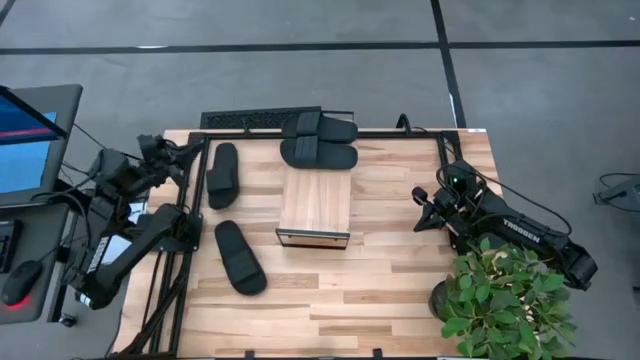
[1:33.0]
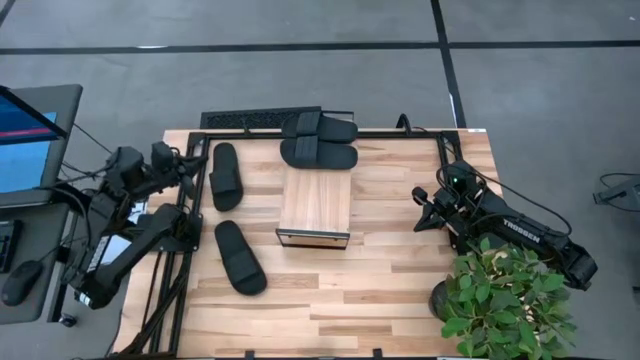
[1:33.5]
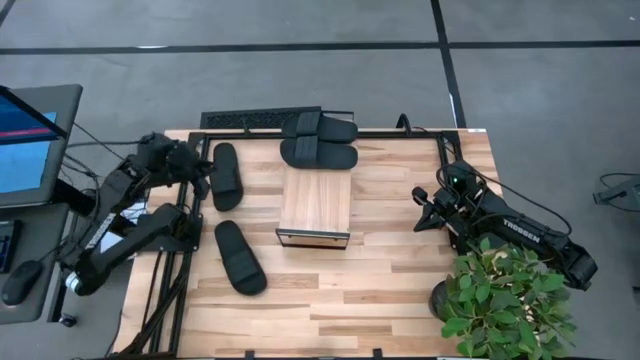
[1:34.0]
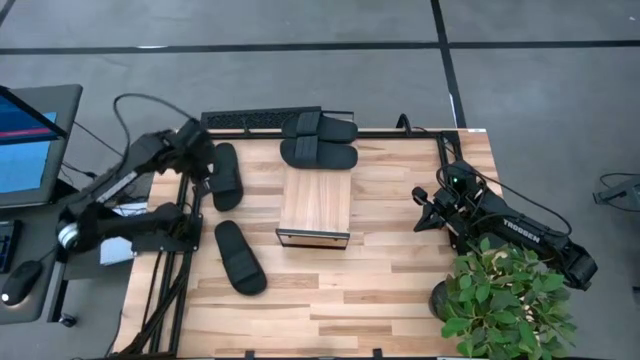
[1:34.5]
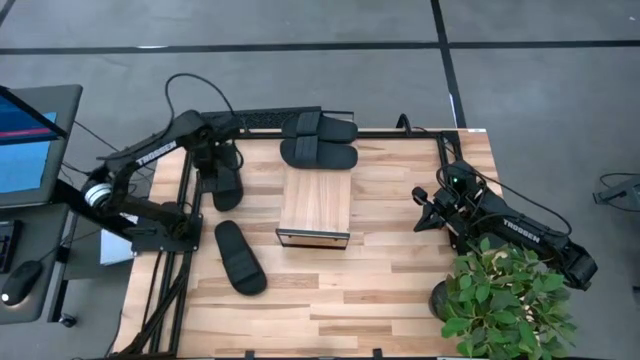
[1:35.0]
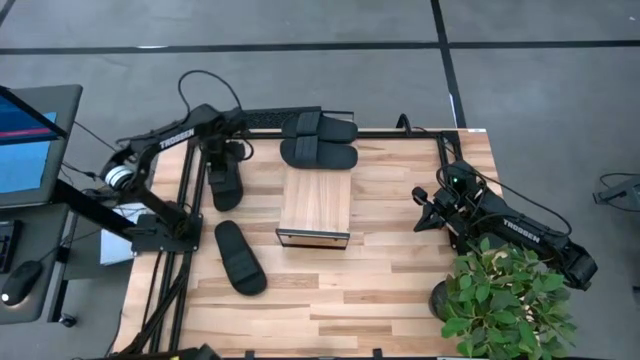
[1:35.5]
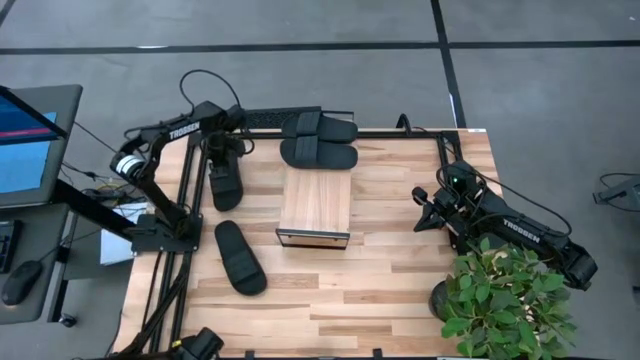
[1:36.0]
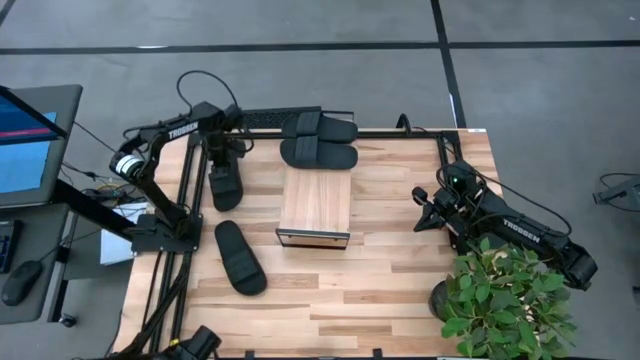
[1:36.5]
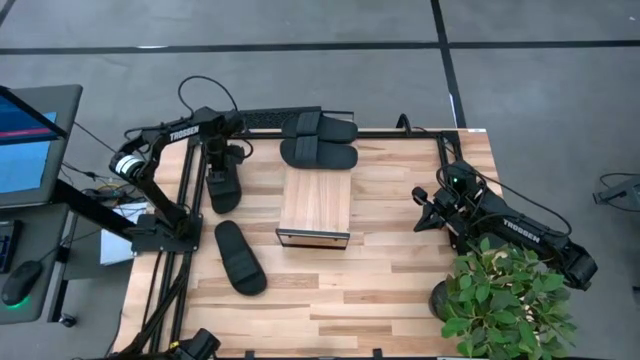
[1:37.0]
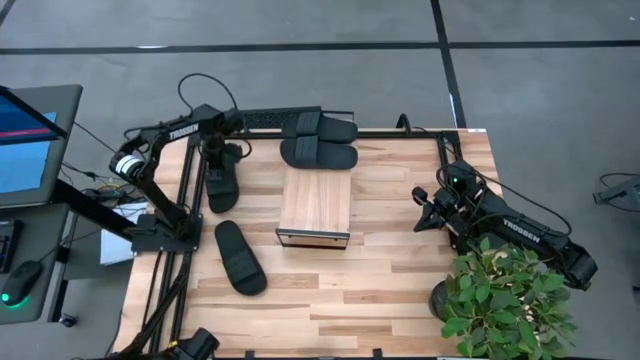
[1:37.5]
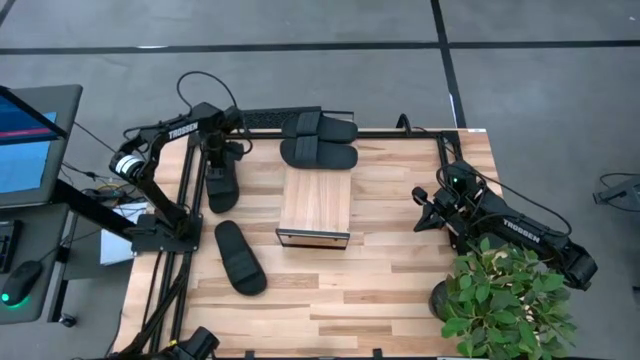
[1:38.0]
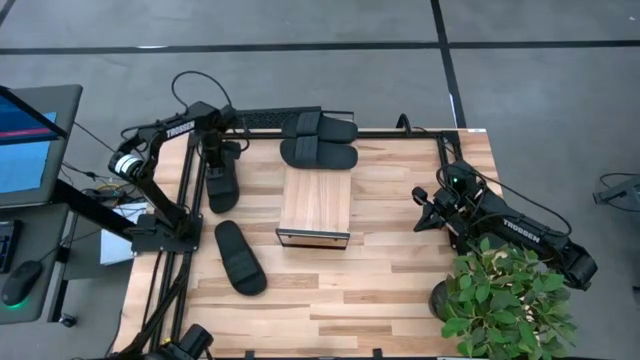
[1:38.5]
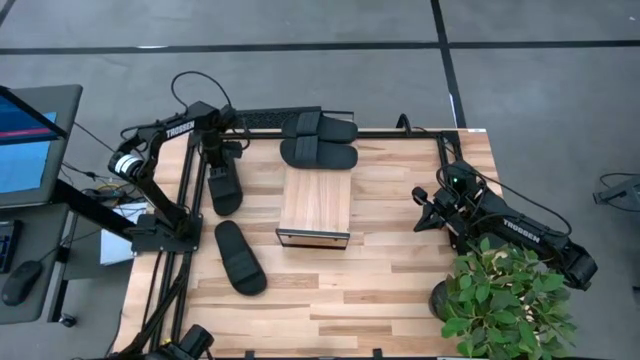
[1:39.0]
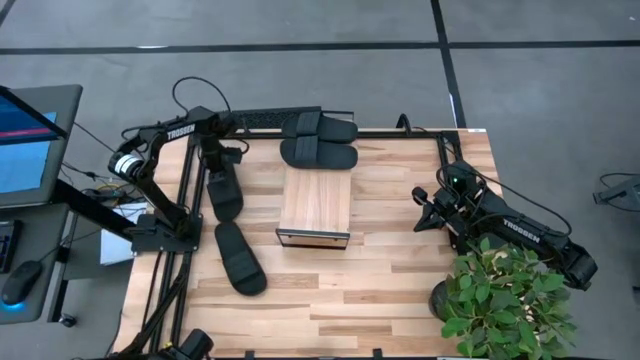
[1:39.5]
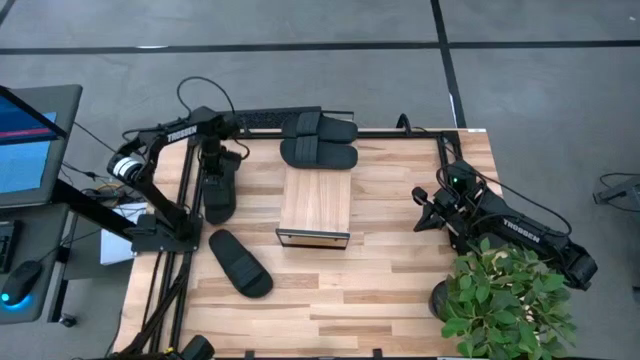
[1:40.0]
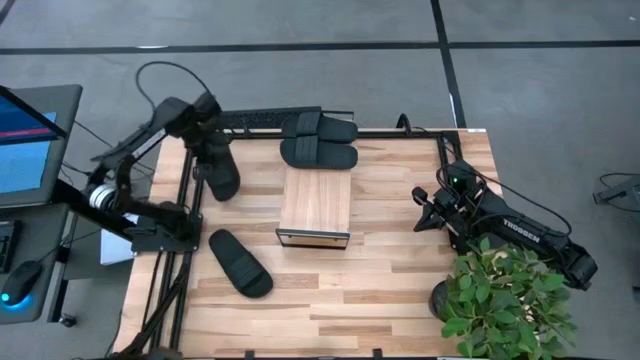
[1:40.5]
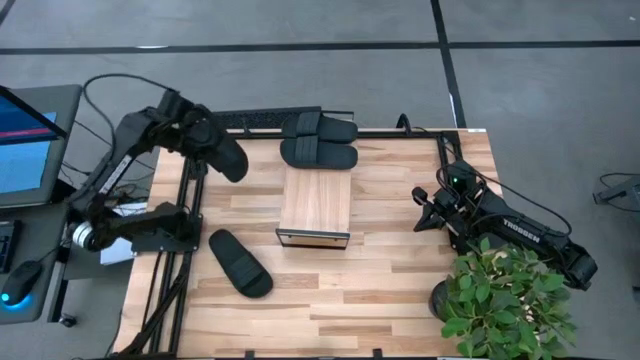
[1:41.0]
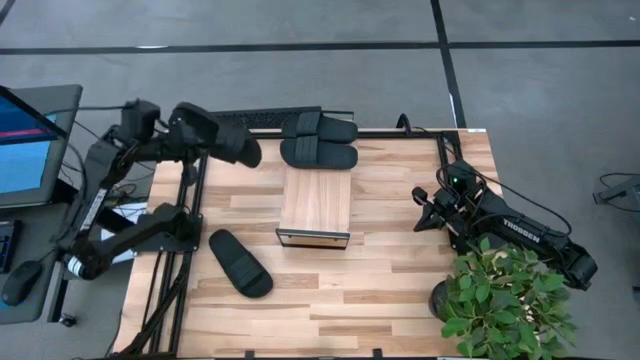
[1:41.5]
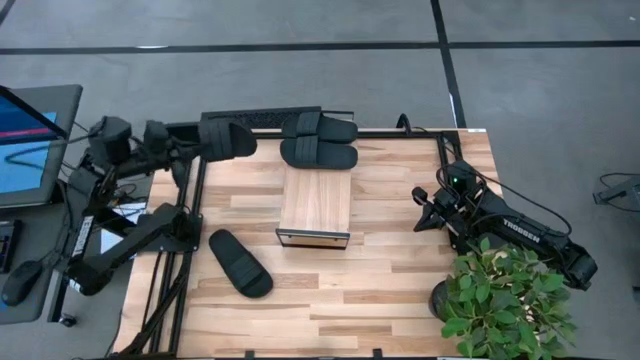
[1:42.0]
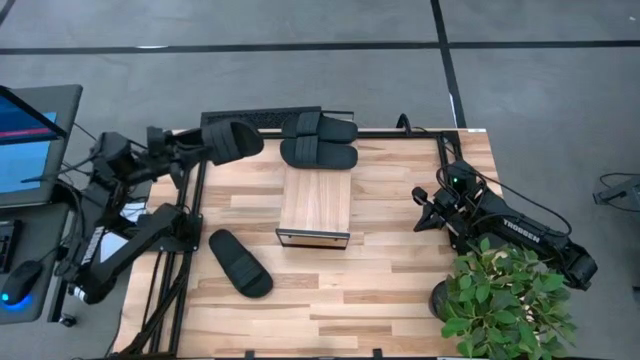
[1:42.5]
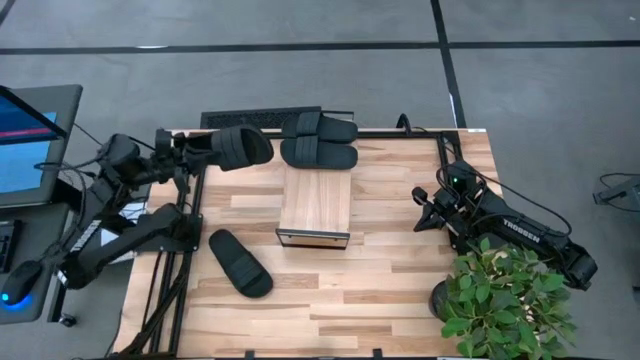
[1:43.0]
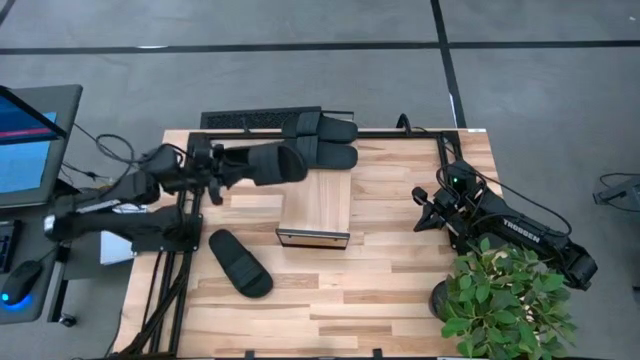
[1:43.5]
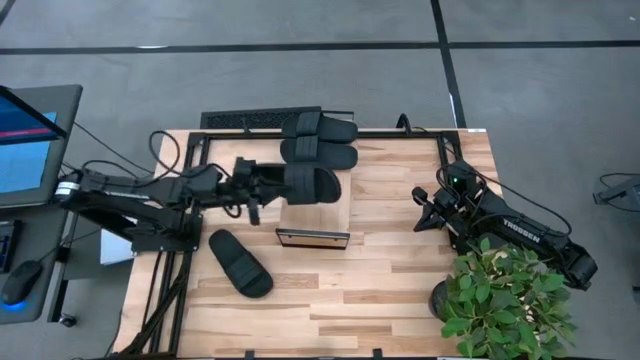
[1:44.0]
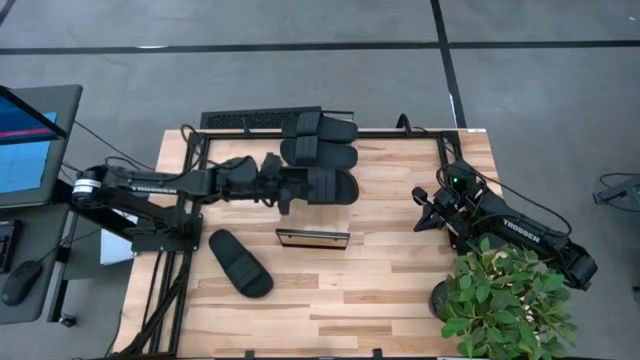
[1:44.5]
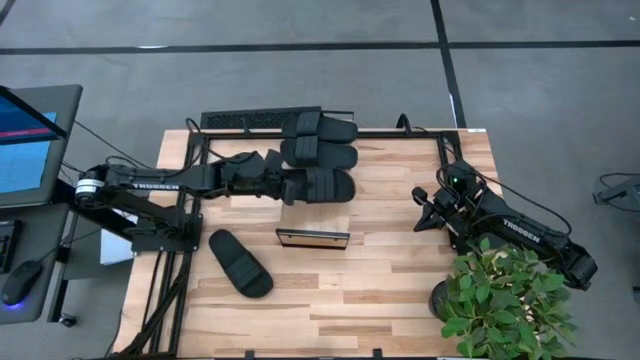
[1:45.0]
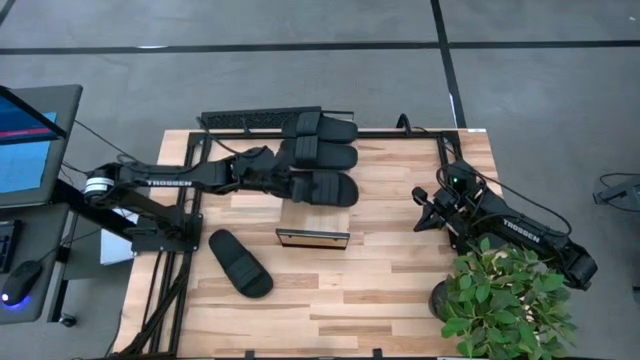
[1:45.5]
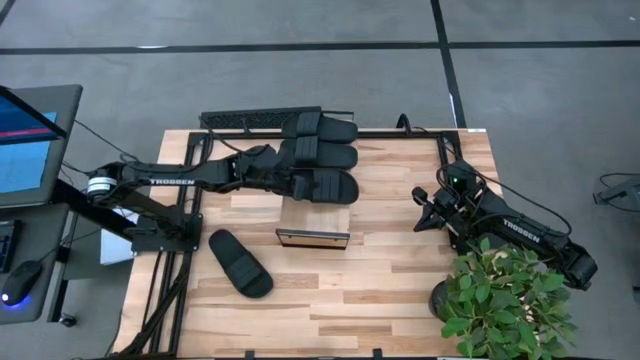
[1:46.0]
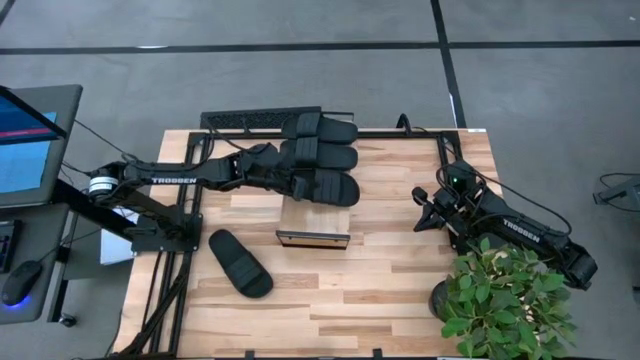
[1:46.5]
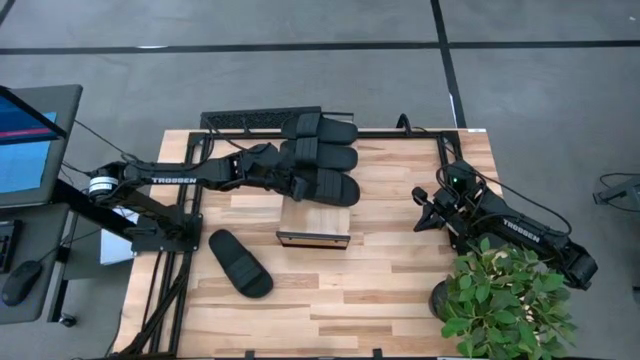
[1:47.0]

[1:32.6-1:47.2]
Task: Pick and place slides into the shelf
Put the black slide on the shelf
